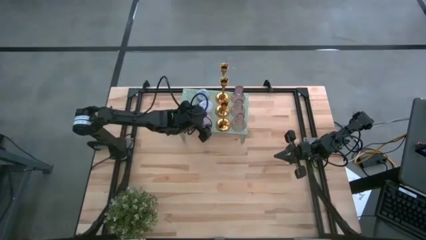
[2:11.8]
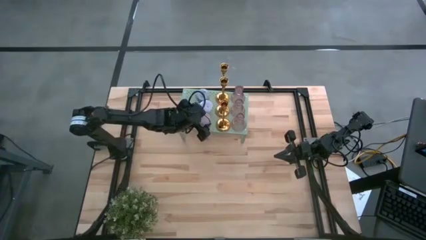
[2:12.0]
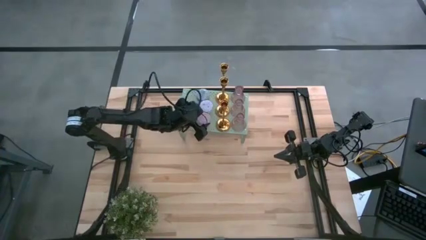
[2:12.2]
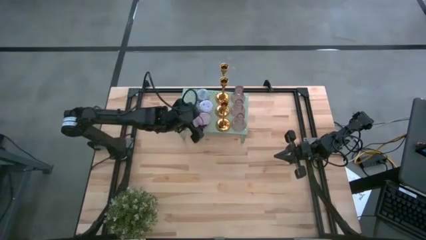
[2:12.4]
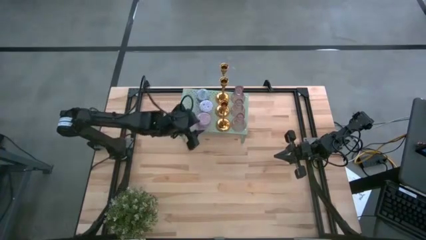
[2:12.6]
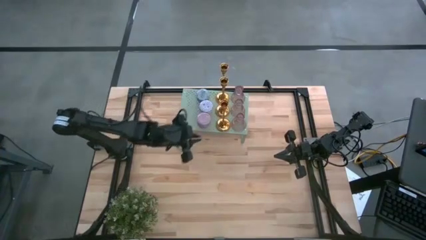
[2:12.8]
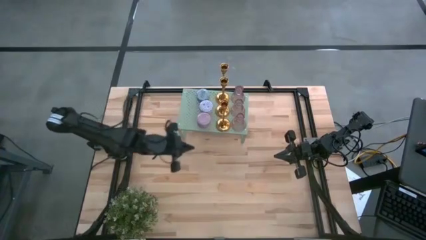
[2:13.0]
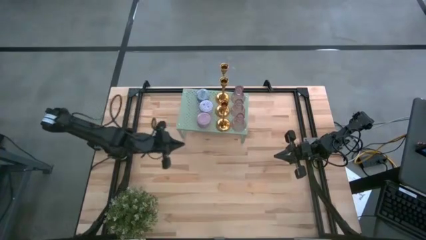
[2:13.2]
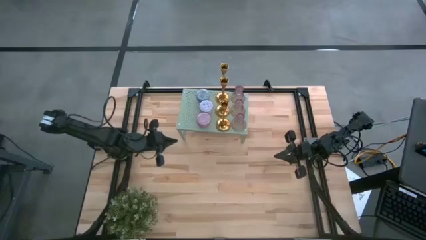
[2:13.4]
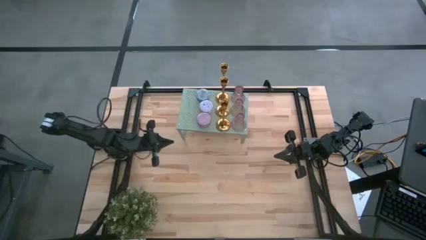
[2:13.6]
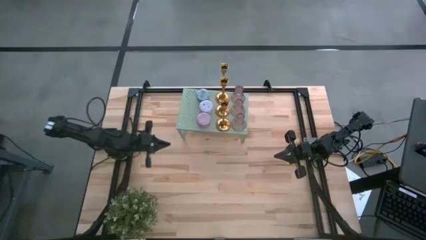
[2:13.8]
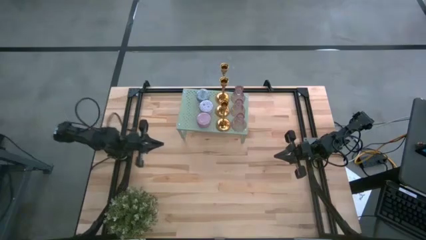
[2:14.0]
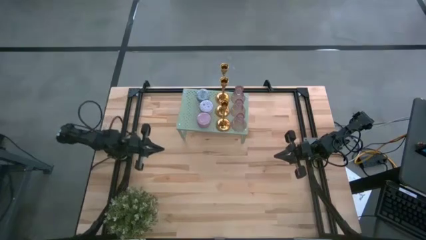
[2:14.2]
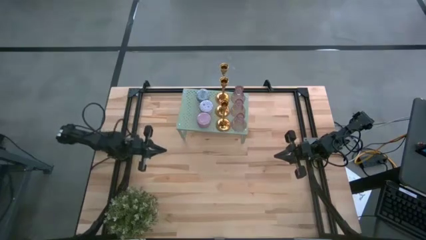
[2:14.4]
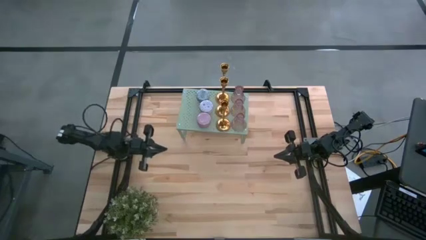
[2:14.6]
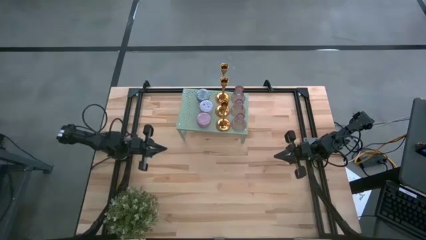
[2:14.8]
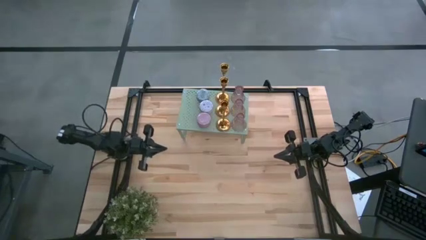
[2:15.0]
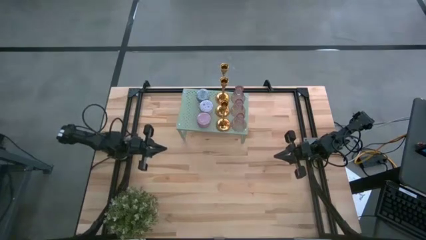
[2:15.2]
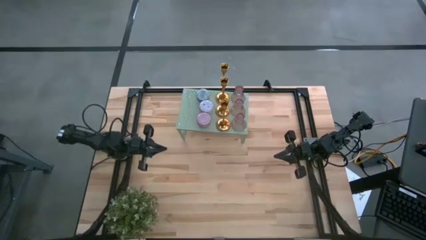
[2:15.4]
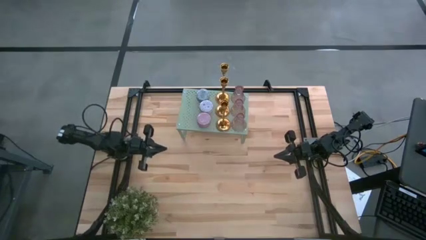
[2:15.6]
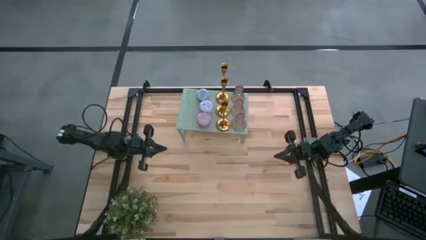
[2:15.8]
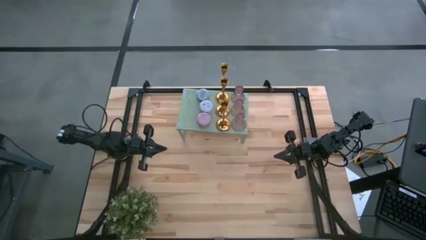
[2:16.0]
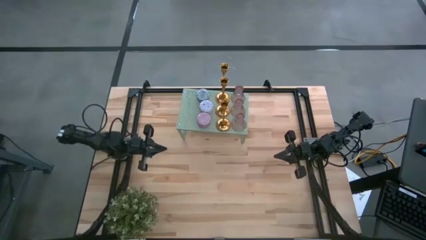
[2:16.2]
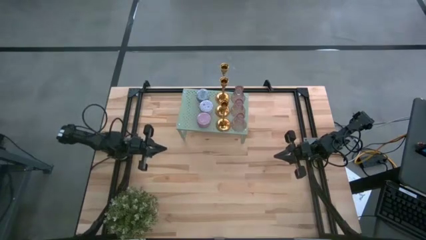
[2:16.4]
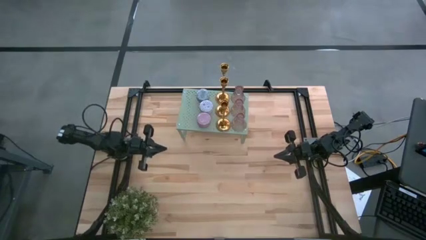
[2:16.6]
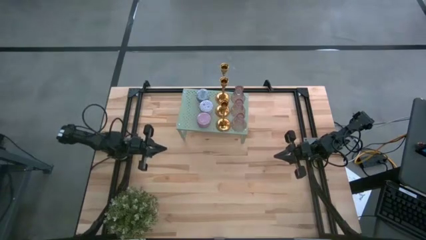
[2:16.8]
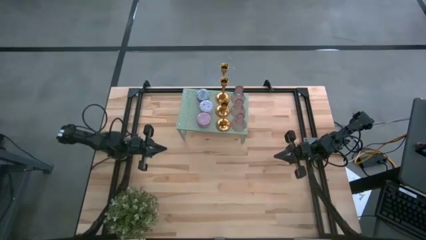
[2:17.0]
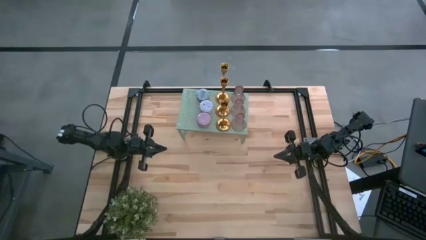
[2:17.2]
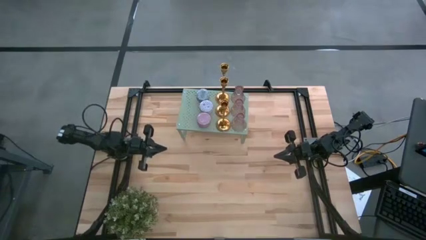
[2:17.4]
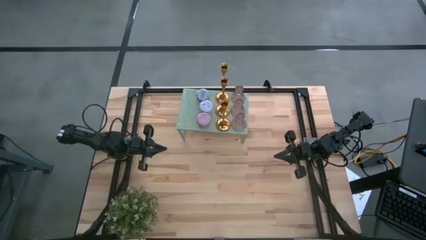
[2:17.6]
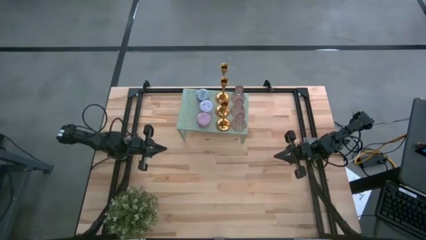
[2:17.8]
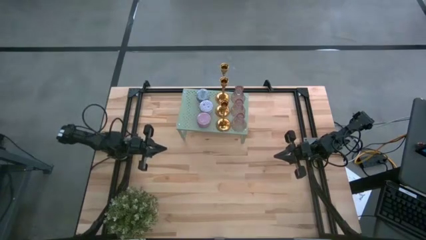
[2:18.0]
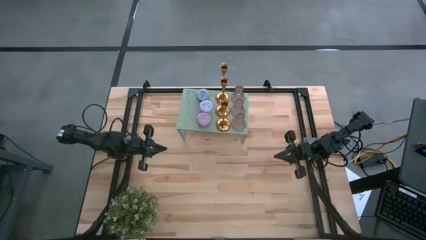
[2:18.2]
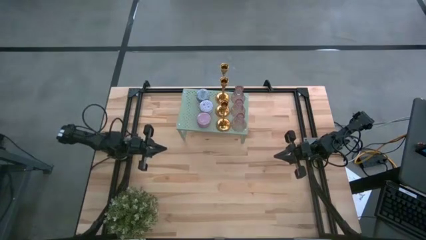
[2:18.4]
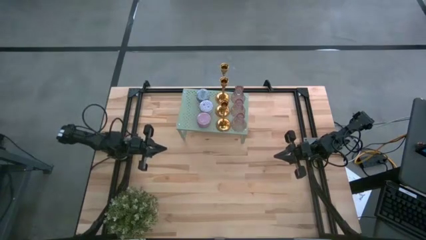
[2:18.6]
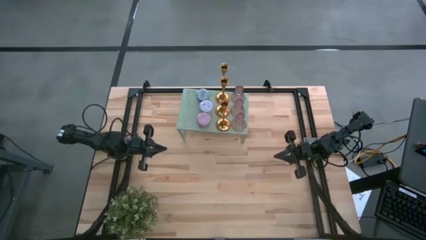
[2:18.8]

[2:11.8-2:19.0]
Task: Pick & Place candle stick holders
Return to Home Position

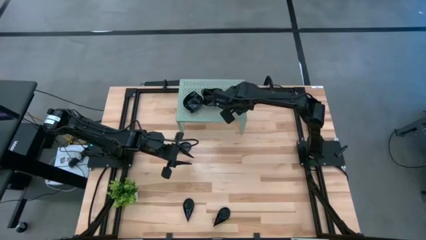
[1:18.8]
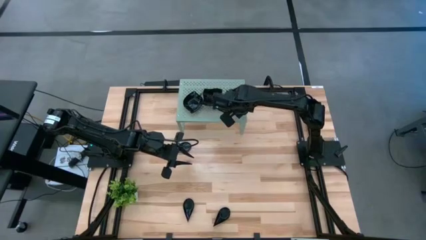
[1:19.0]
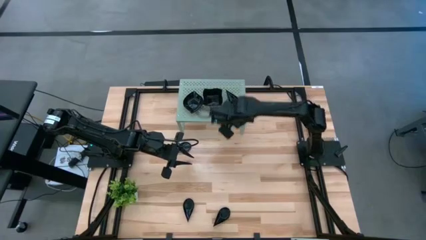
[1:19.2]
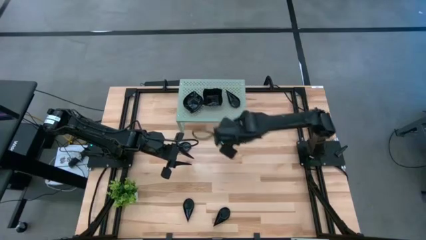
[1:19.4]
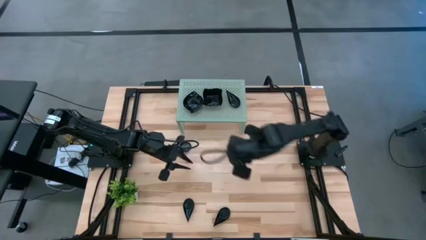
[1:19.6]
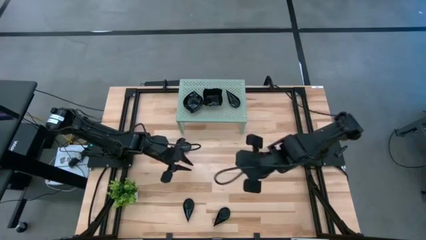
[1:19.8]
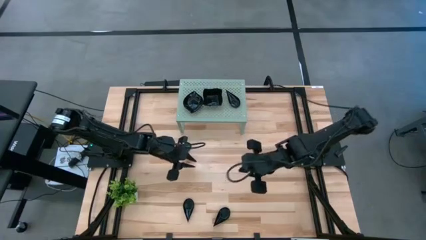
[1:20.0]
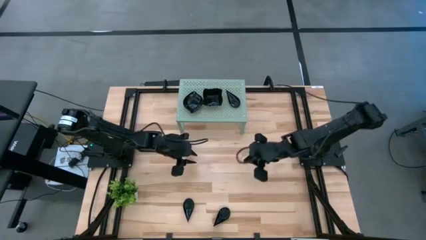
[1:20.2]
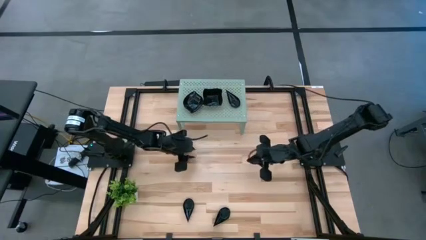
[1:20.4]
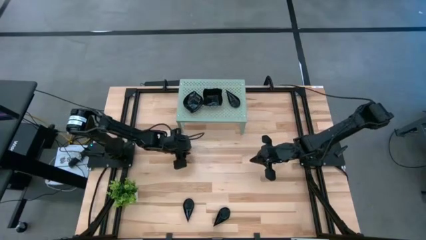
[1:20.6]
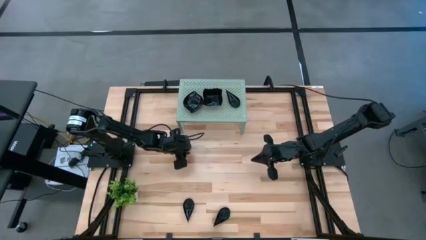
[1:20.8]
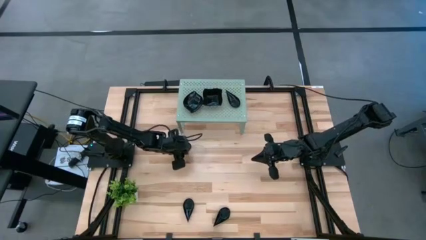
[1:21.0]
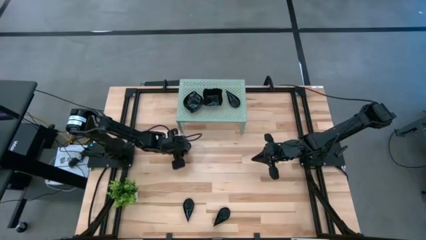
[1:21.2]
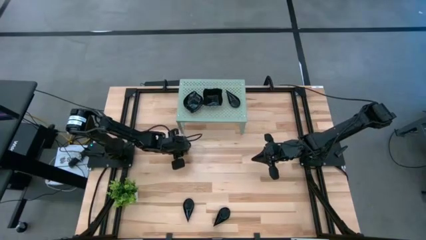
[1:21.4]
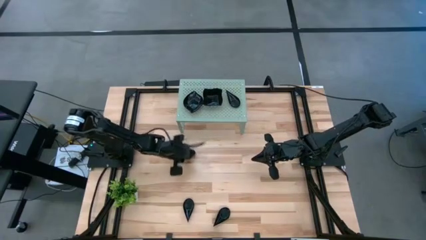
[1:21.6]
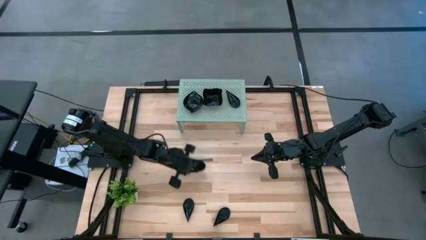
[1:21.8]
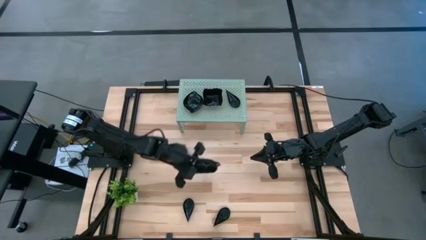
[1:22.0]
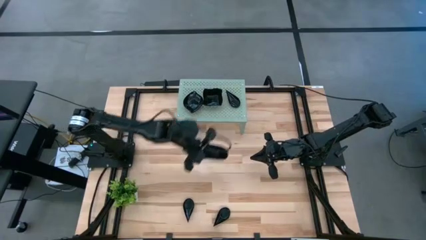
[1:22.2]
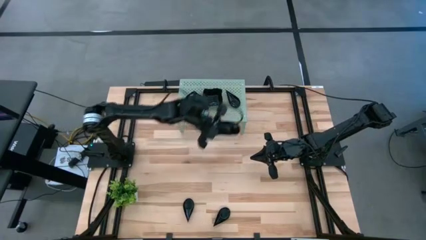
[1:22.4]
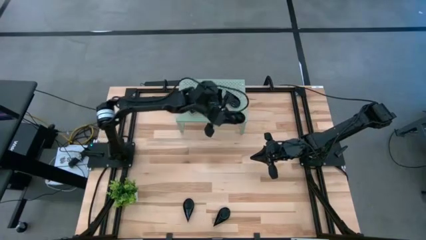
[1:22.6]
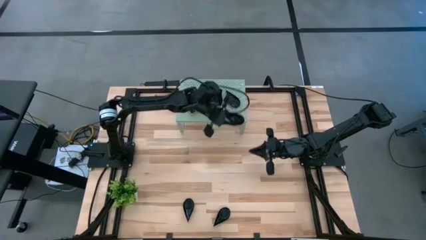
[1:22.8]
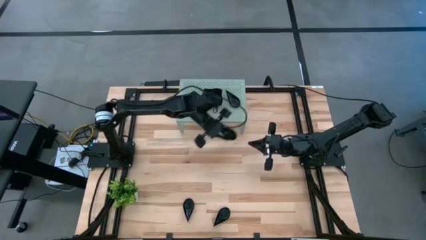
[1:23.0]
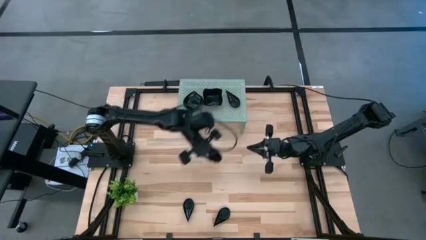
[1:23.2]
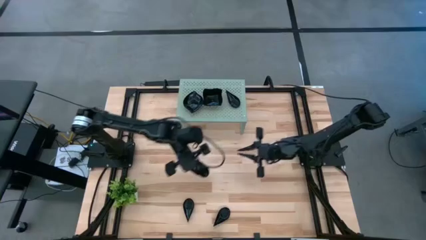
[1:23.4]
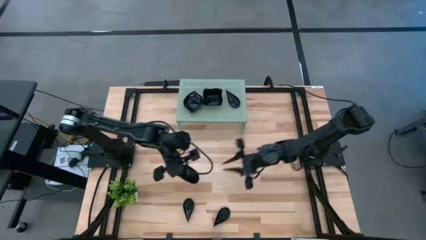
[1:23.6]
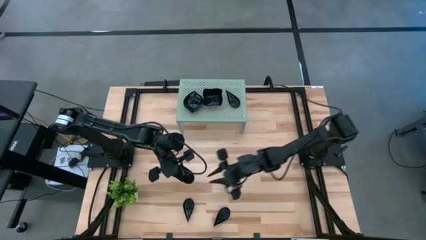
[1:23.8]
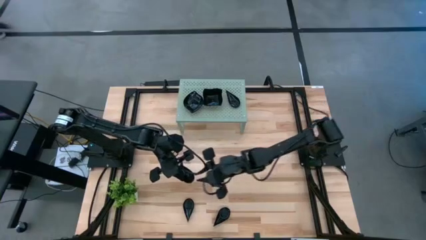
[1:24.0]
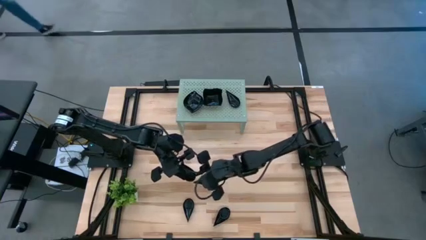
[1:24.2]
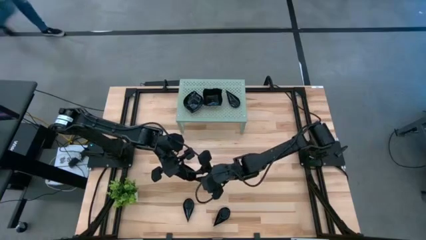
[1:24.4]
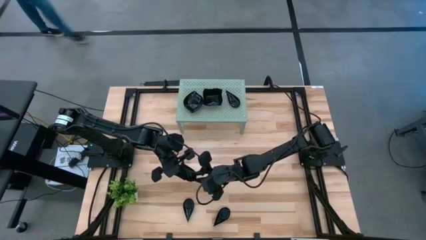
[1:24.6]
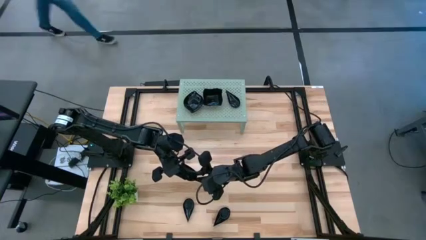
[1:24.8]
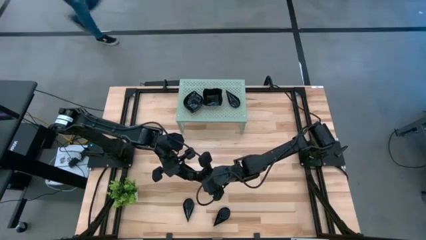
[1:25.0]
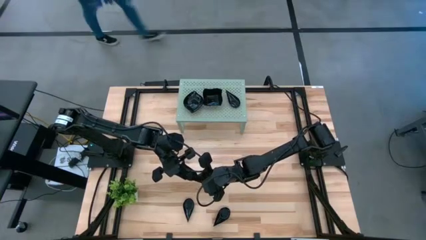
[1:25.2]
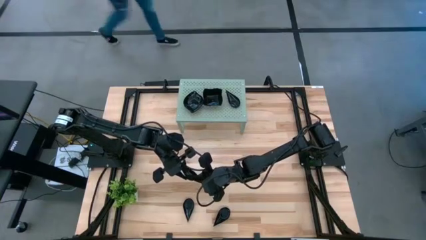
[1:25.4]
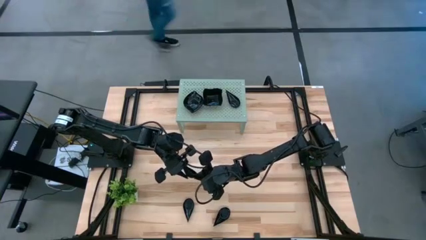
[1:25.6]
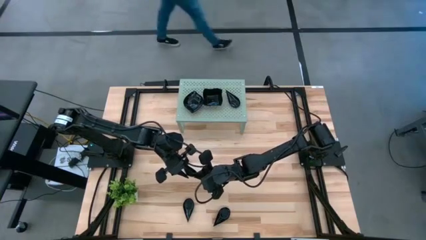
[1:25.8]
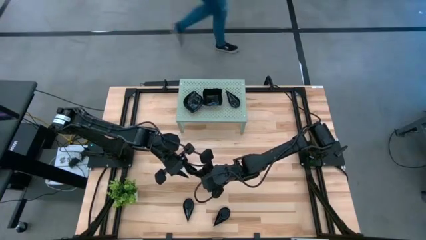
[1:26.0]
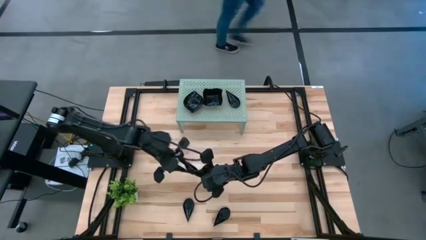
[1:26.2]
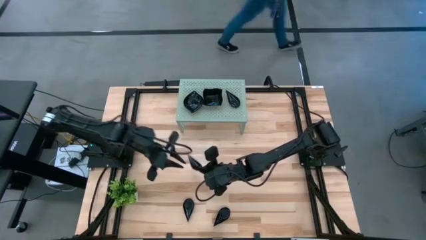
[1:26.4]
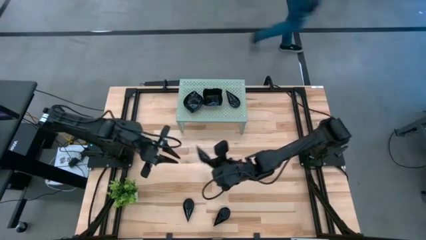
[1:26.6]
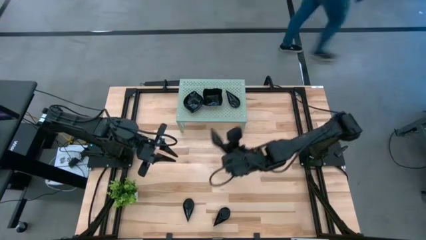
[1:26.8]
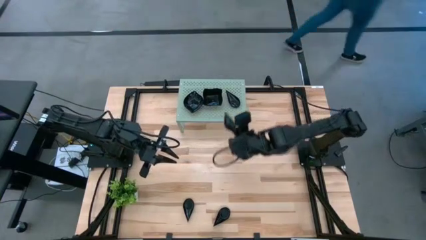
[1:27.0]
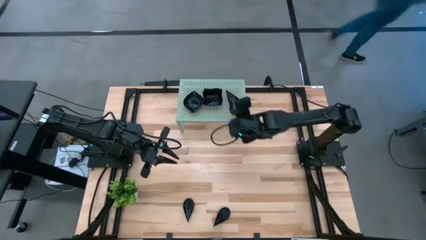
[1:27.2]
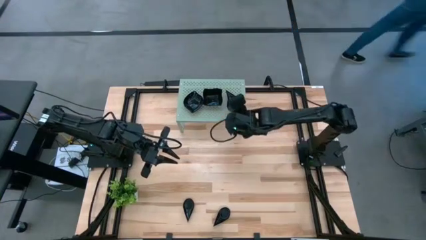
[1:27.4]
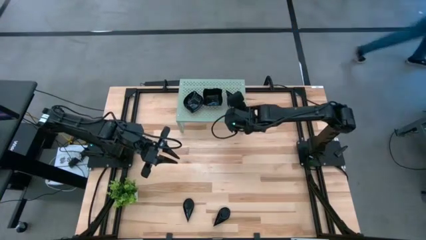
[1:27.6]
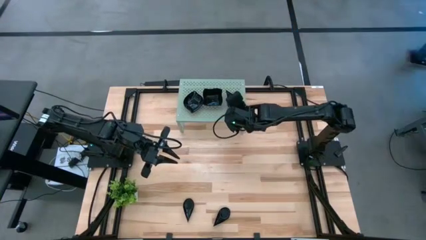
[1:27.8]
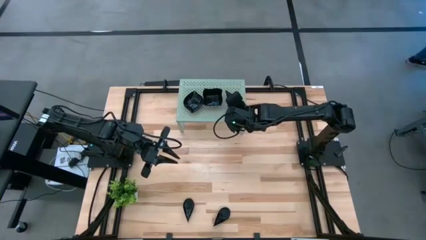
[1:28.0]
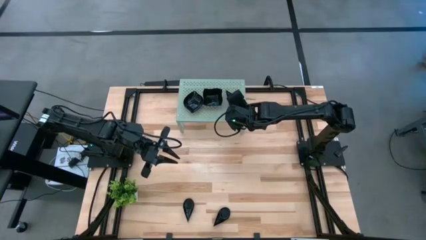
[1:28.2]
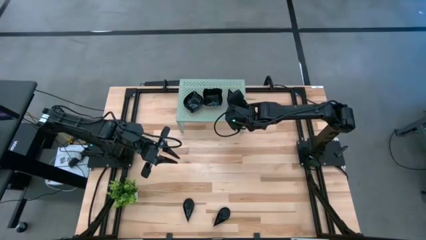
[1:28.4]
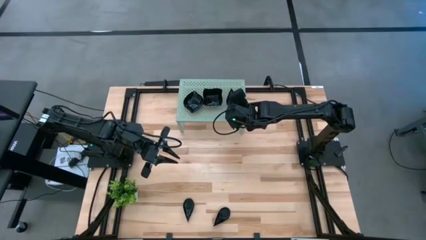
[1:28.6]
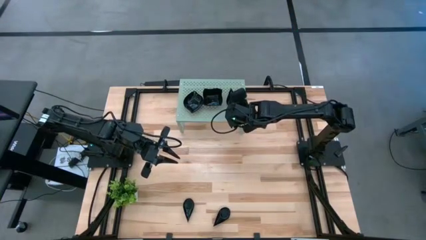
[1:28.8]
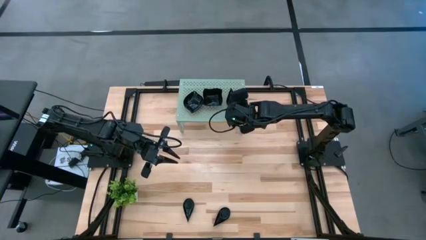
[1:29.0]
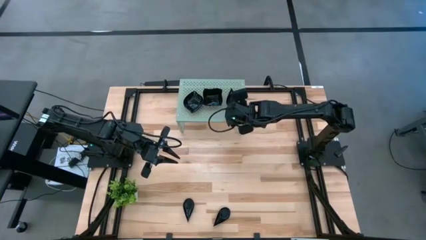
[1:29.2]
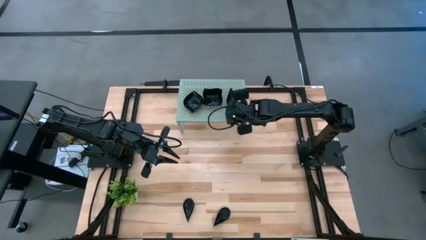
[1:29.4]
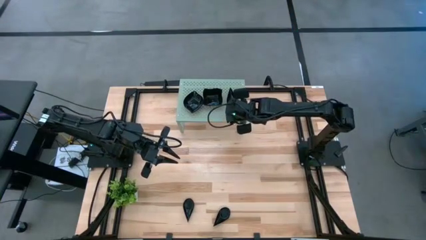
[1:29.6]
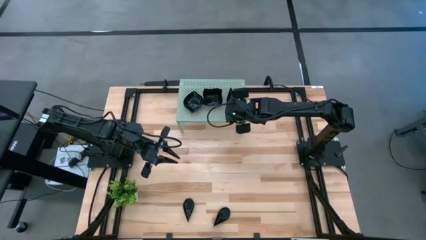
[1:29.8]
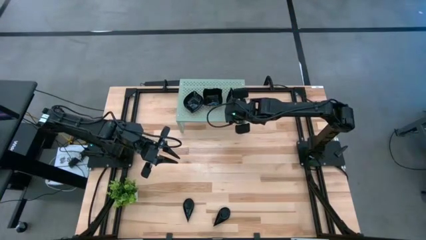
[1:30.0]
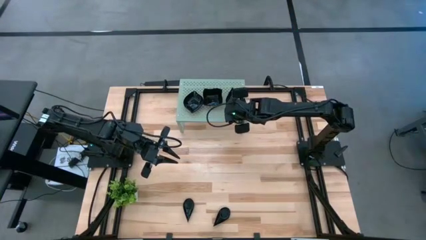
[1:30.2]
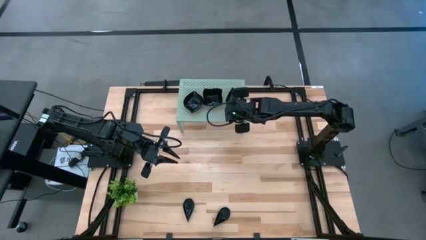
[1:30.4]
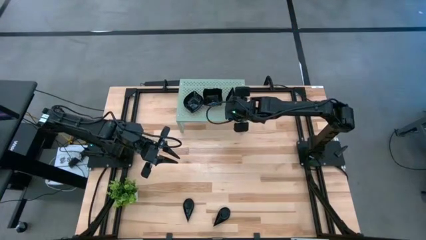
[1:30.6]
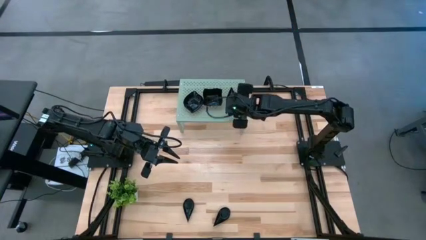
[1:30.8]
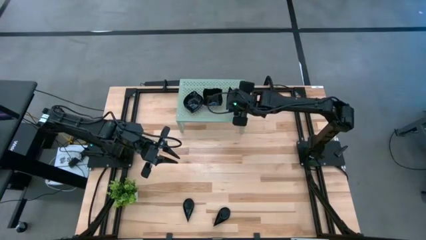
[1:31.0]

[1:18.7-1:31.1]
Task: Pick & Place Mini shaped plates
Stack the drop-shaped plate on top of the other drop-shaped plate on the shelf
